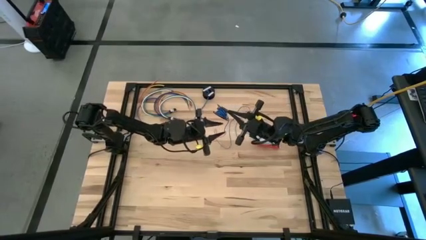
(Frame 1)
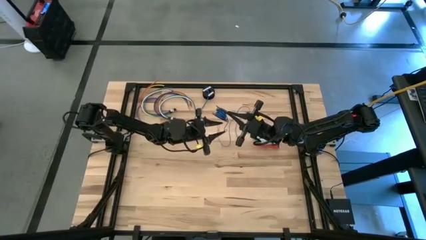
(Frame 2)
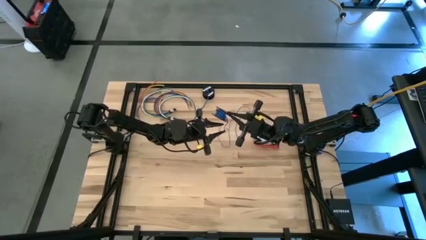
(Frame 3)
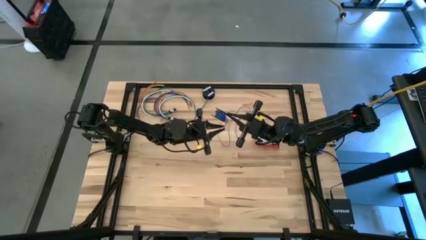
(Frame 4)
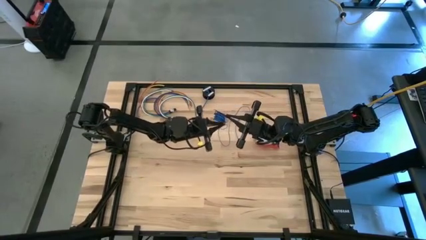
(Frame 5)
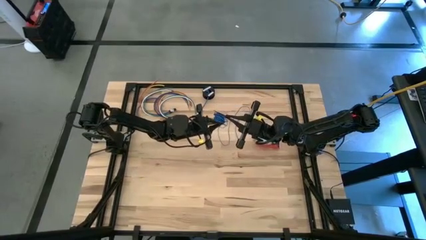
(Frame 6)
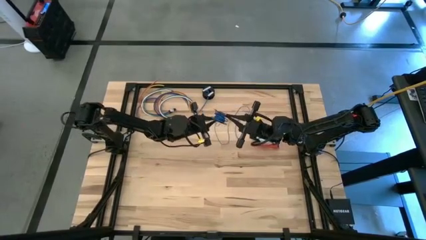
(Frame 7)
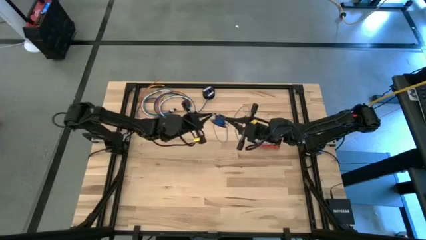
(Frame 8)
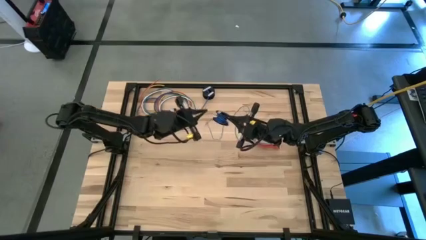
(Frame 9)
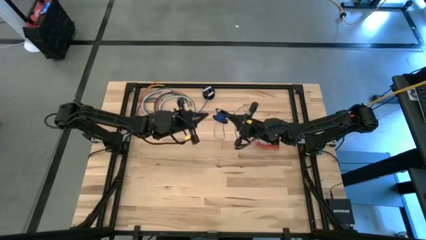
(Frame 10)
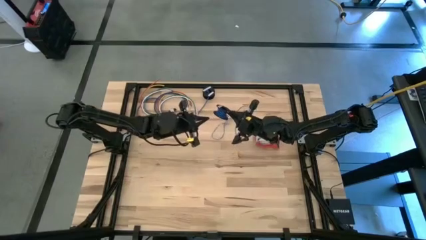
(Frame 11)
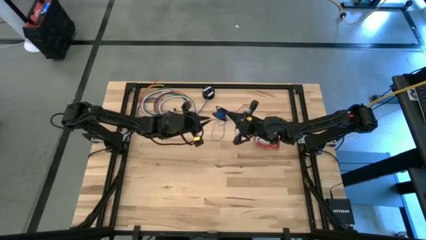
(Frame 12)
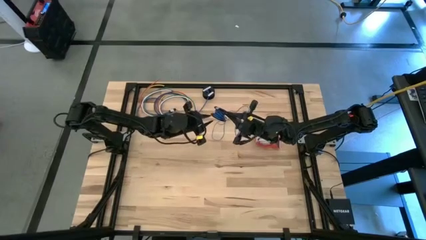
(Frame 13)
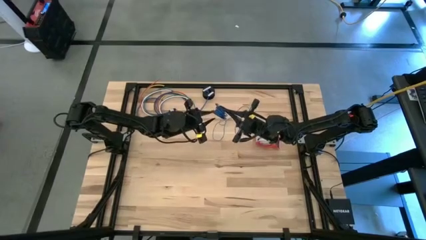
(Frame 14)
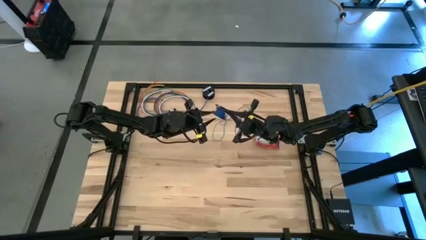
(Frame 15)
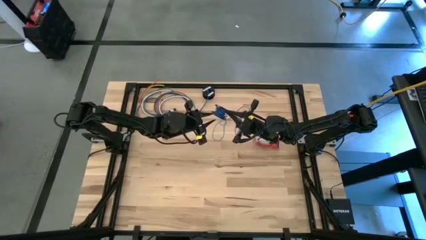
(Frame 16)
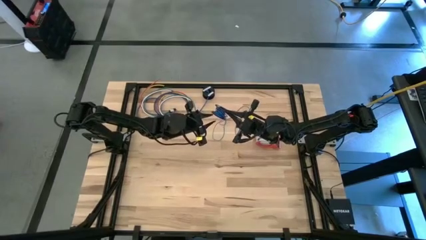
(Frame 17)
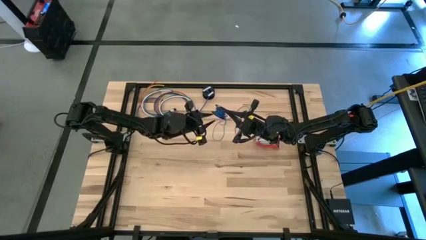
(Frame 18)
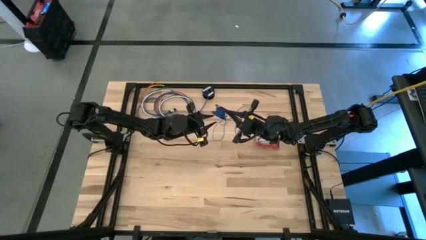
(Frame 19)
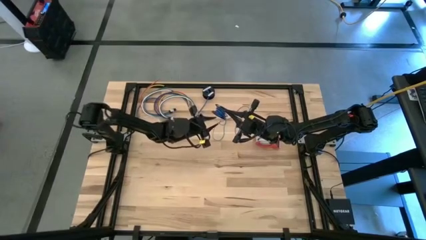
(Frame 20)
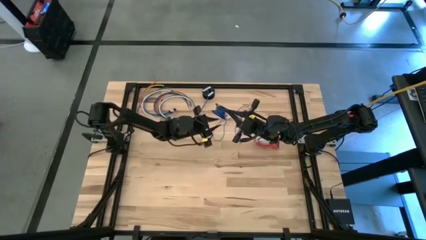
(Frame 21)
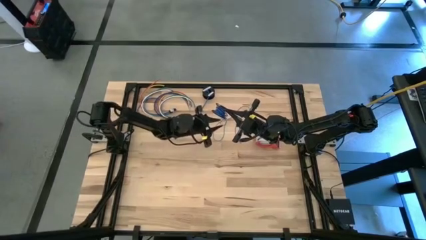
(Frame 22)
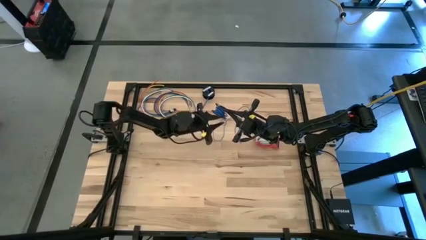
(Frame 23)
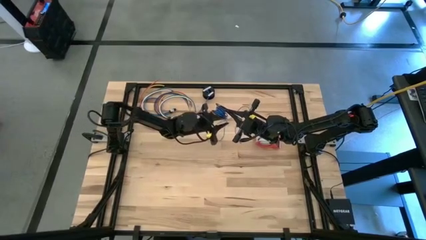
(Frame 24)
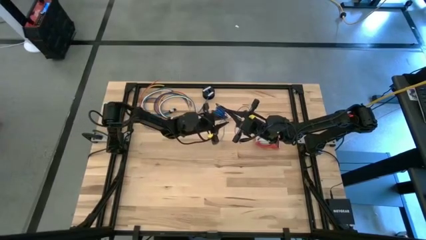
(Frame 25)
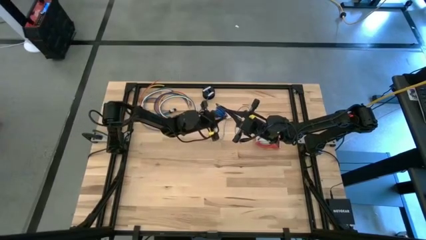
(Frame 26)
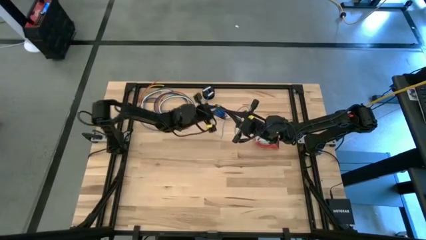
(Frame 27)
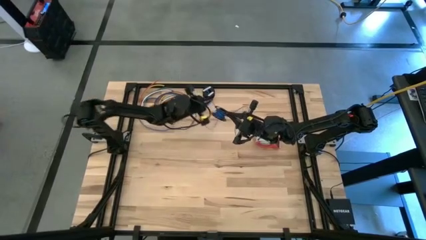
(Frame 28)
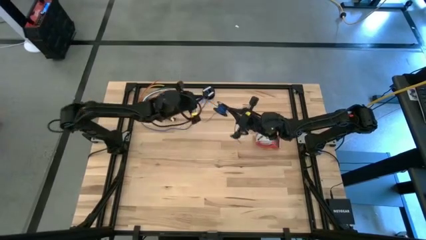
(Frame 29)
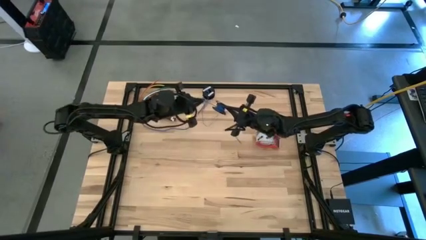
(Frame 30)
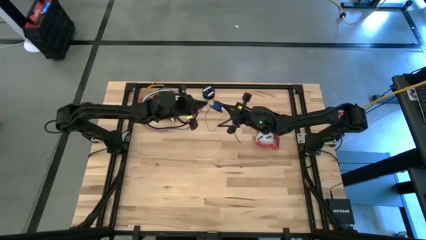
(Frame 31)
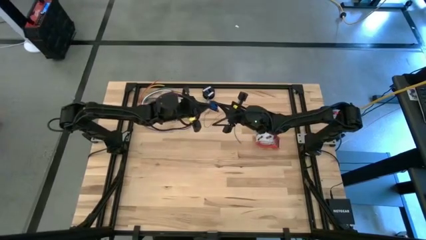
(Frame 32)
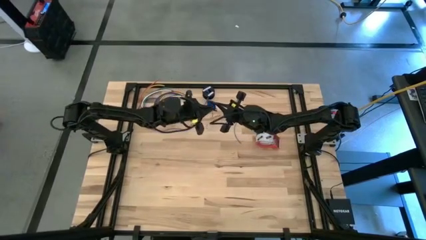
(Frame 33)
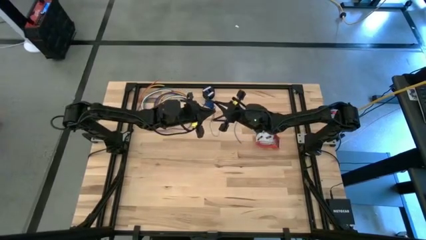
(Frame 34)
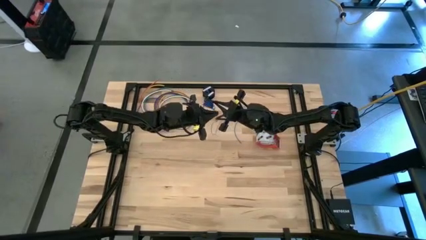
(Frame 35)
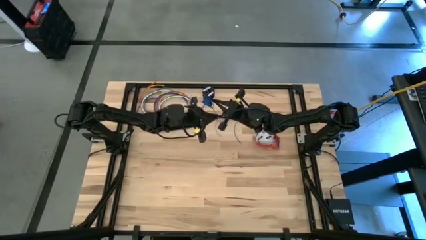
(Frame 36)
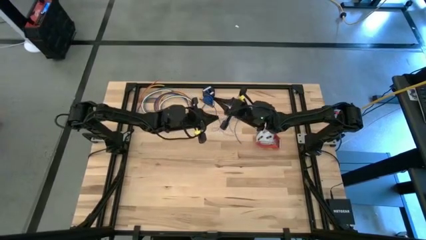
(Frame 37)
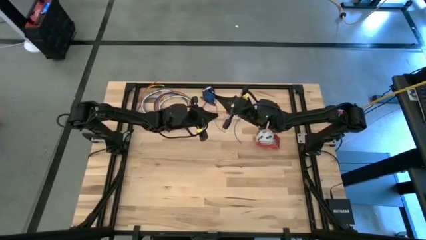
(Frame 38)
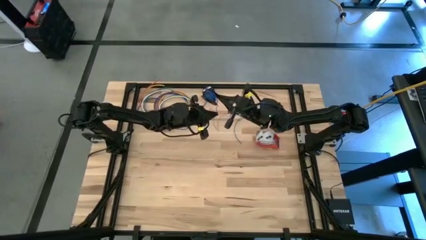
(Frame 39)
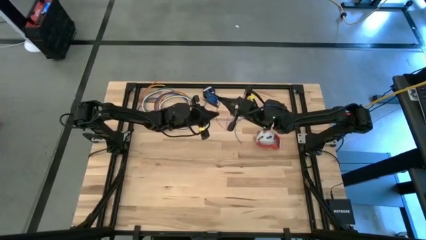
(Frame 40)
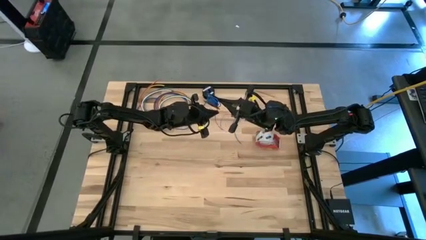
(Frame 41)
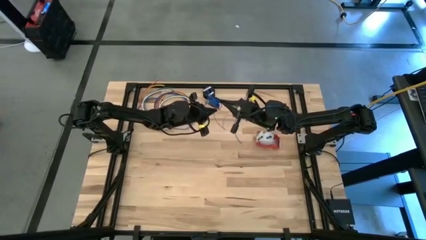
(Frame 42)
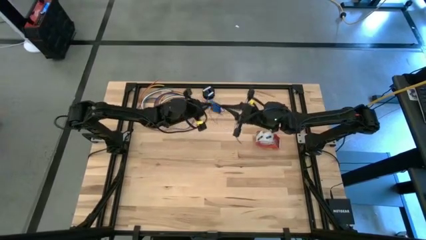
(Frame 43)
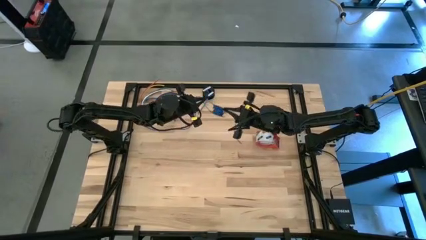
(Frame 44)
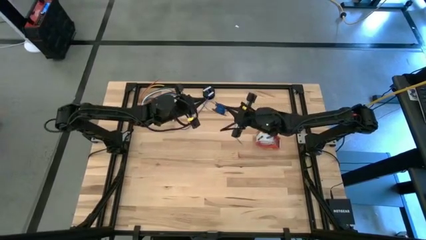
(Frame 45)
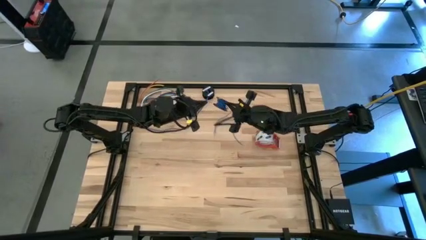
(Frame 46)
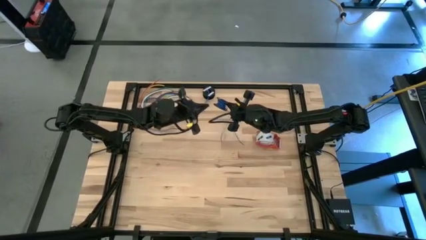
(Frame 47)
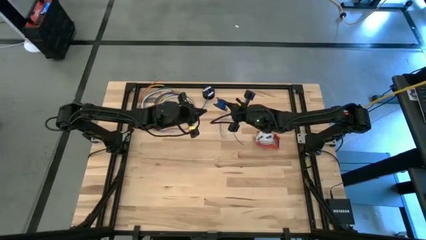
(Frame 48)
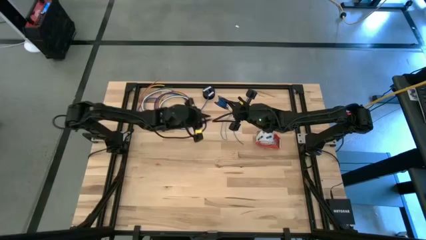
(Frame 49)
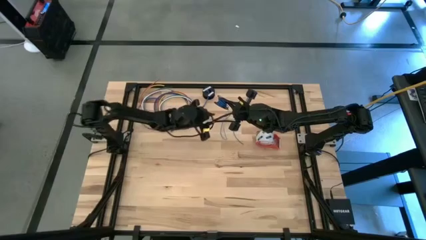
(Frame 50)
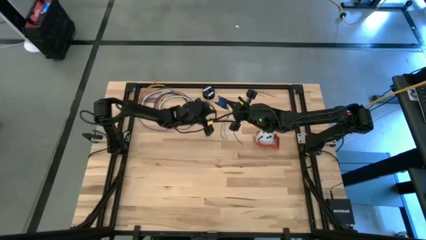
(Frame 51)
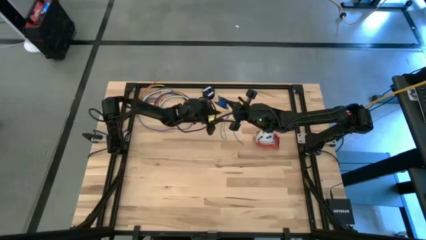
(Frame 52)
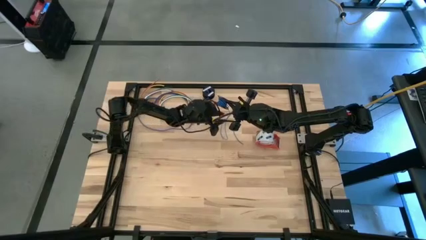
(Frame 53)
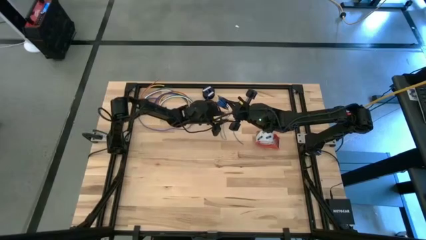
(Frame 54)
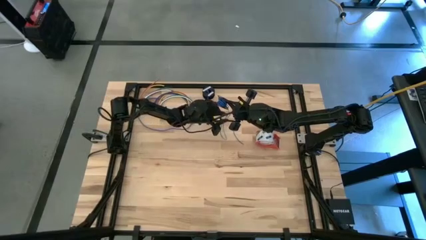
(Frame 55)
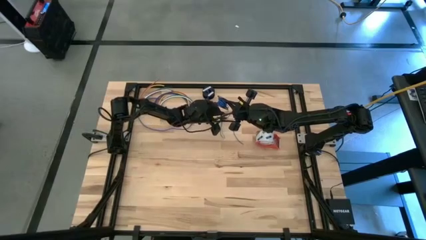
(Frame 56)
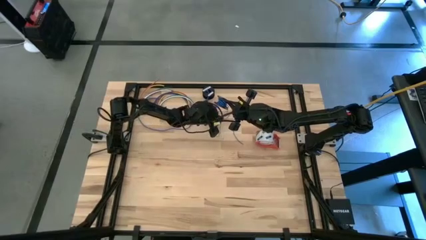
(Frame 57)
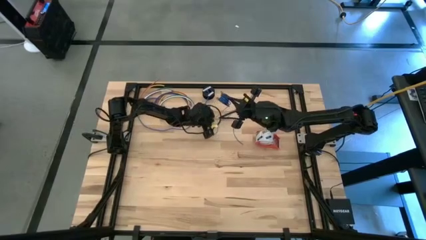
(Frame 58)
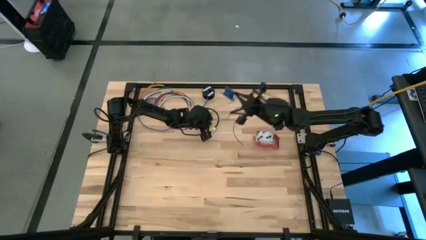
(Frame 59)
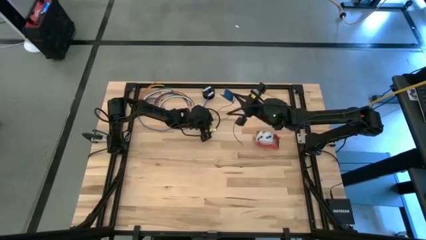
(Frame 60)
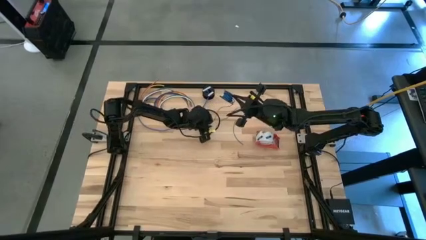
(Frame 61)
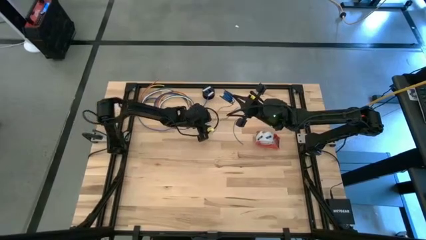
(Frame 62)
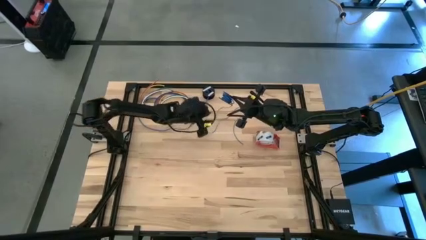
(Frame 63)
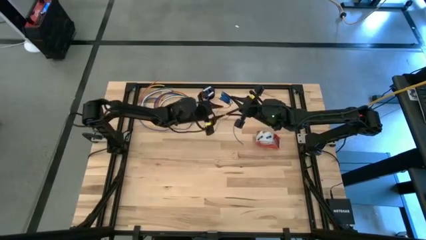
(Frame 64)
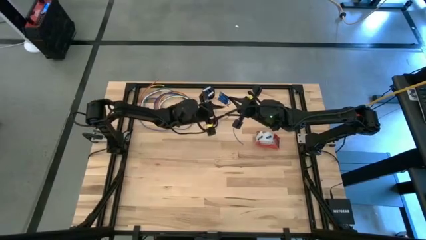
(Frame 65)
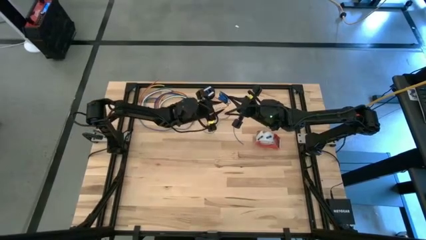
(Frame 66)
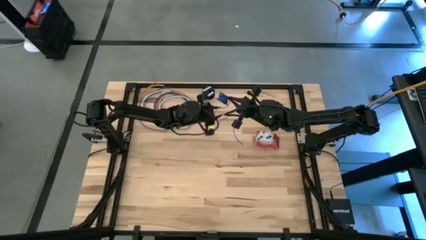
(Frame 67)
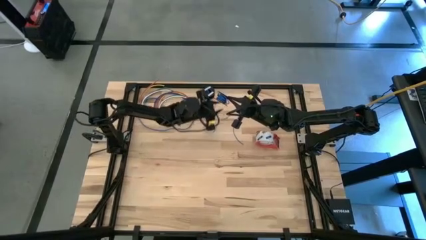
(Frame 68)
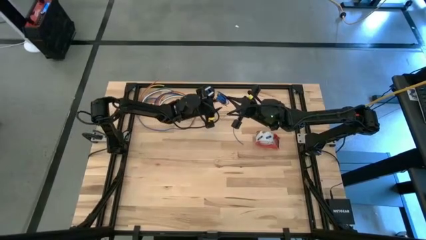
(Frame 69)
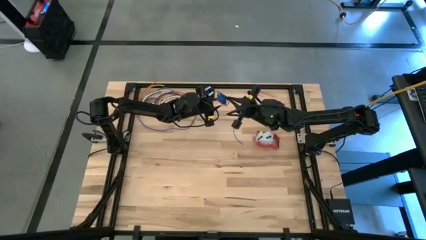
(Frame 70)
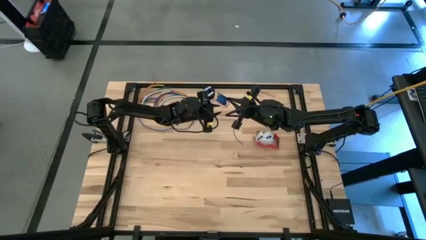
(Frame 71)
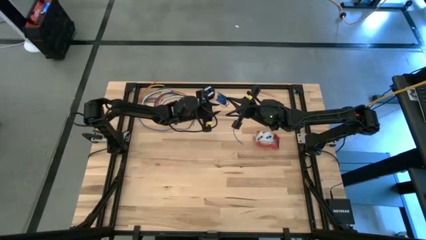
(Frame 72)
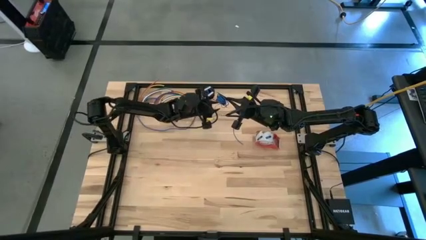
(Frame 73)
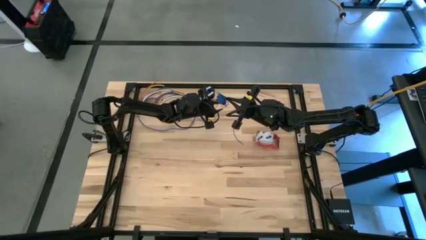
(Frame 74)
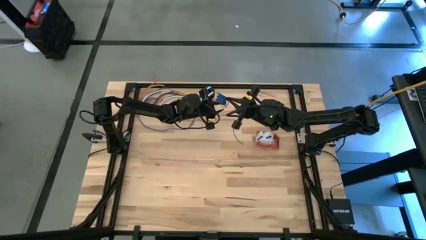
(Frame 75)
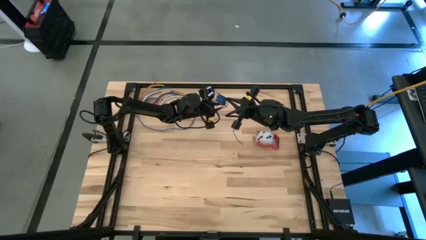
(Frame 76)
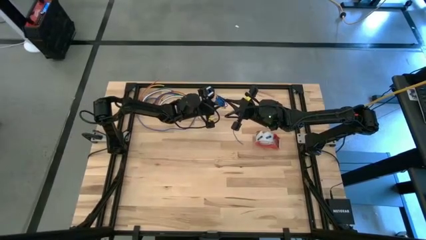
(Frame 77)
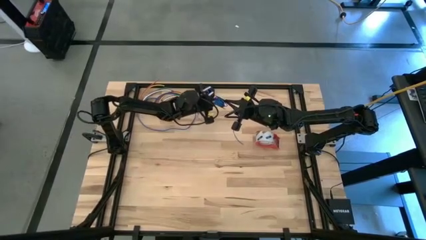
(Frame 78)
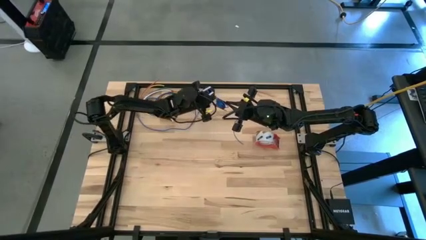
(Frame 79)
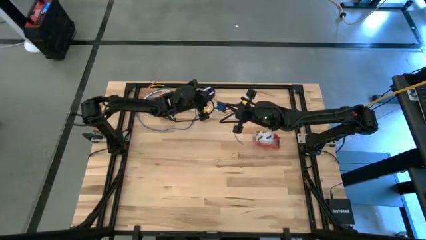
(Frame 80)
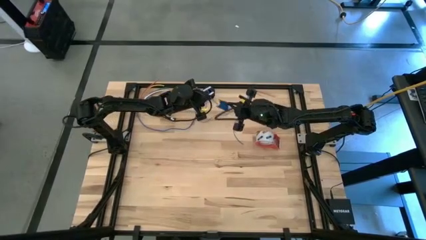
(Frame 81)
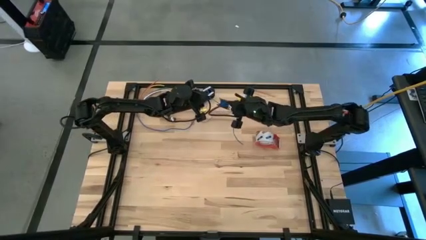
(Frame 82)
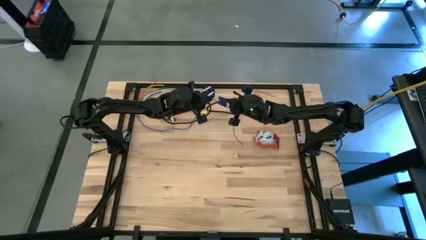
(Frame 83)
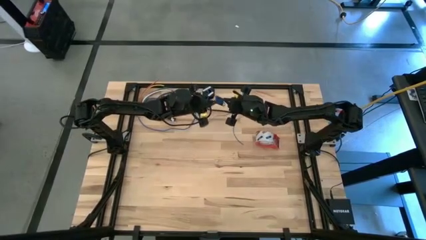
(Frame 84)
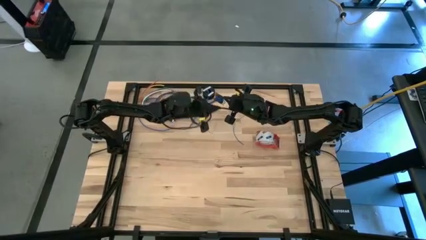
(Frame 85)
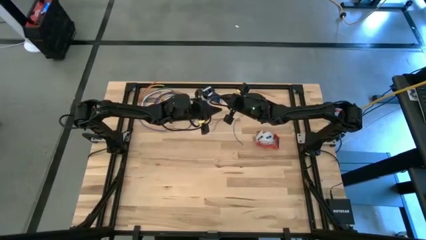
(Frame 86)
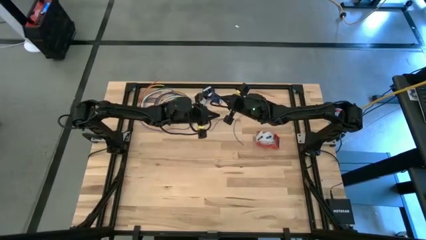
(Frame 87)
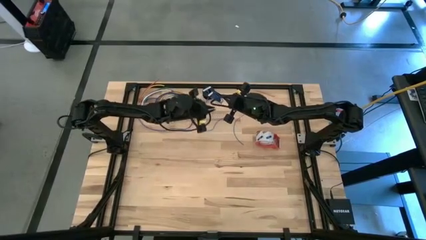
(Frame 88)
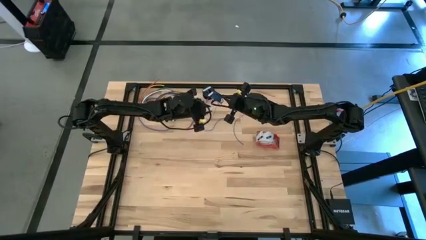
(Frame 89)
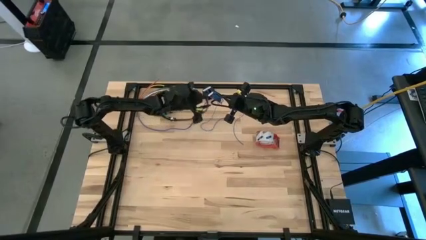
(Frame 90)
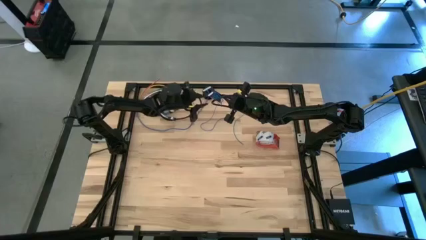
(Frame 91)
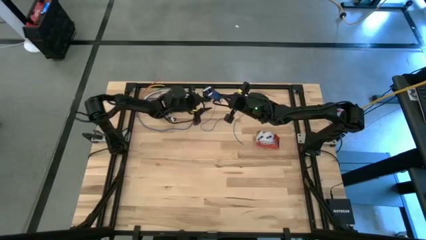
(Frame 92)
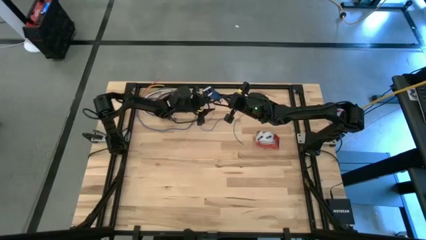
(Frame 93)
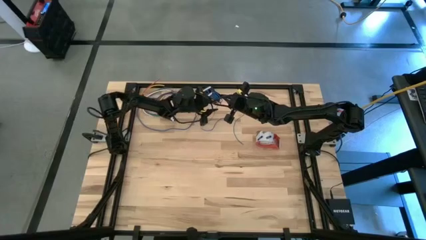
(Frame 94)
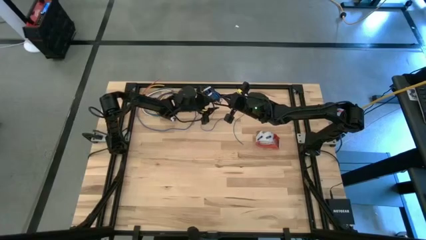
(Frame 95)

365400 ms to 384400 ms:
Task: Coil cords
Coil the blue wire onto the spool
